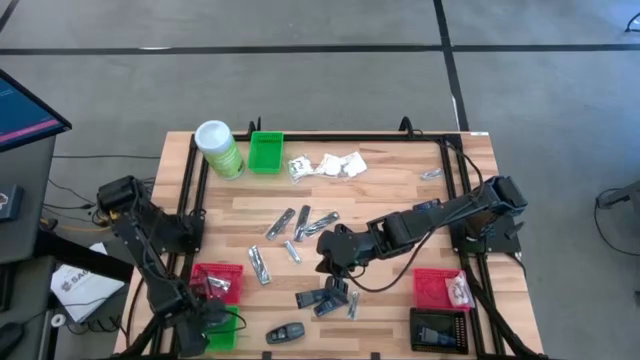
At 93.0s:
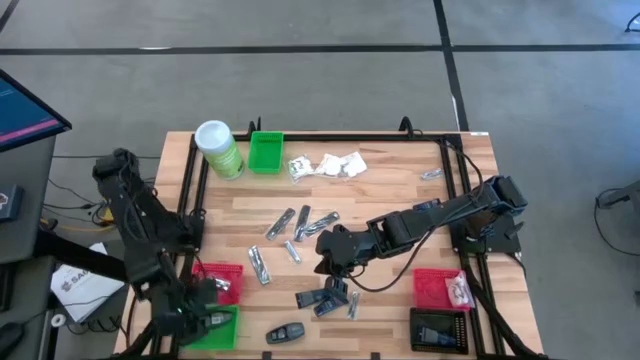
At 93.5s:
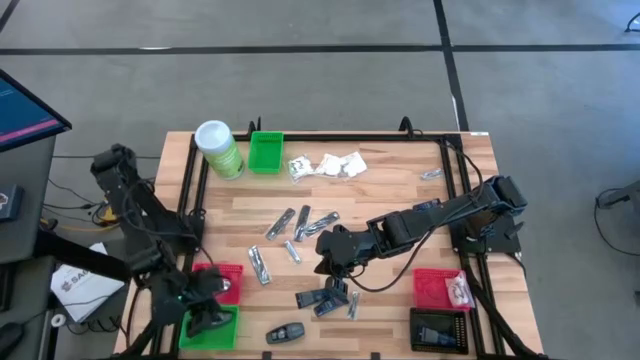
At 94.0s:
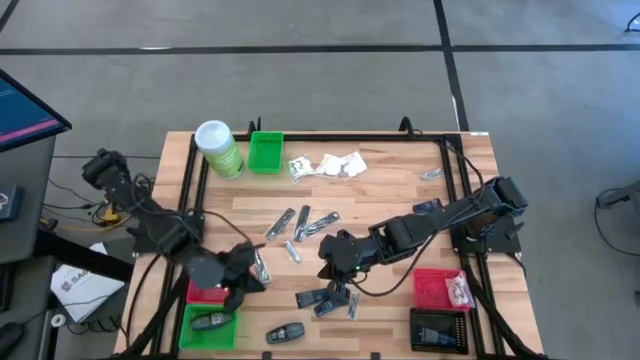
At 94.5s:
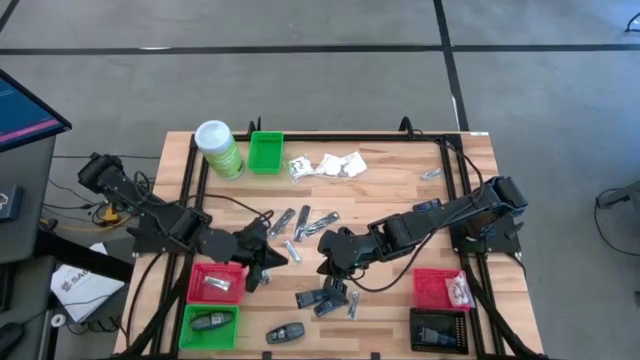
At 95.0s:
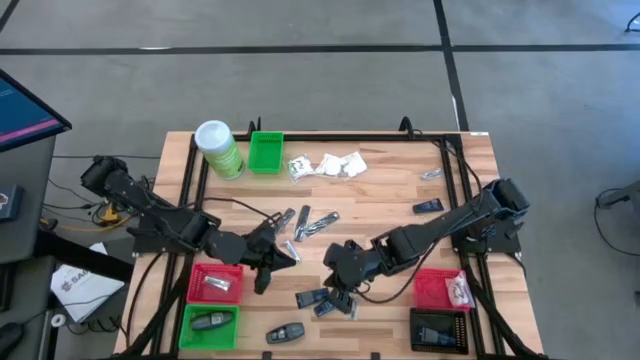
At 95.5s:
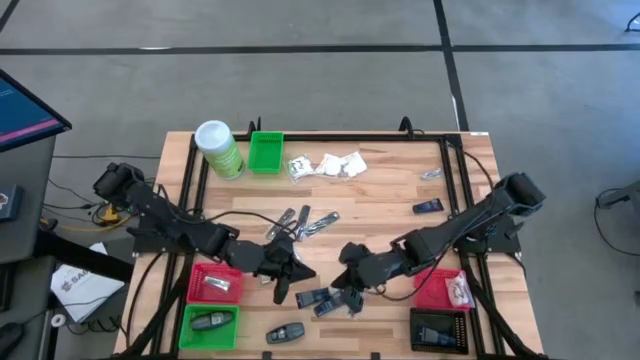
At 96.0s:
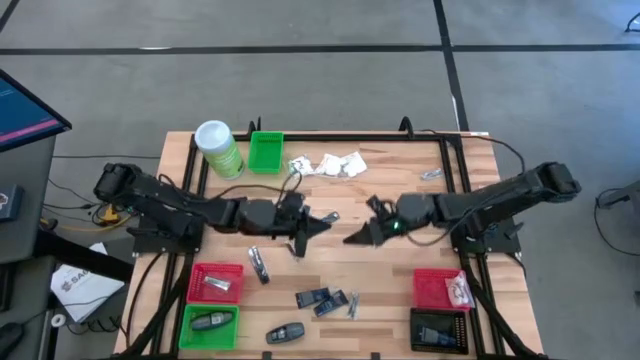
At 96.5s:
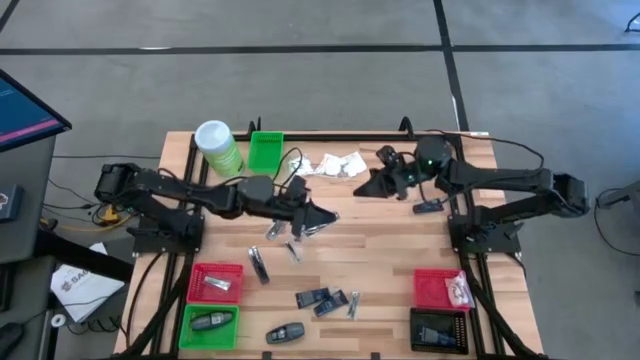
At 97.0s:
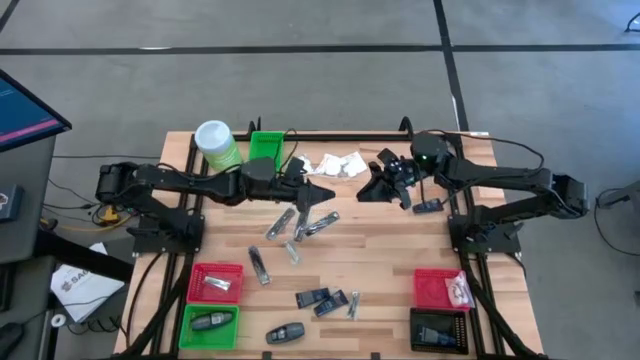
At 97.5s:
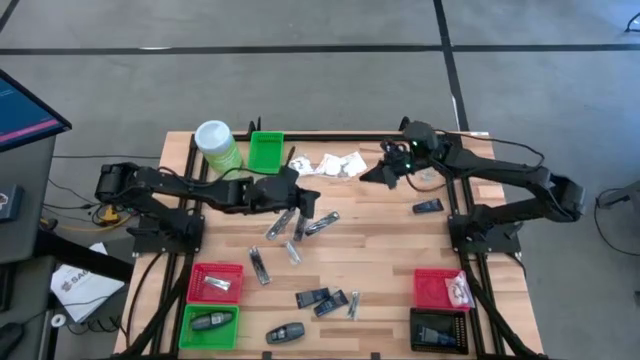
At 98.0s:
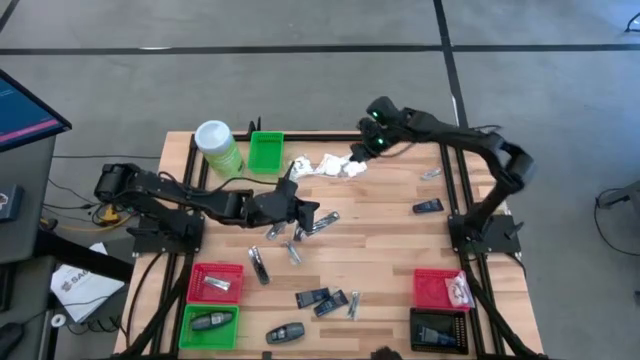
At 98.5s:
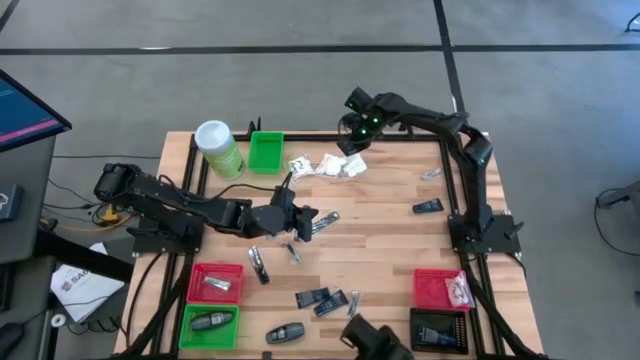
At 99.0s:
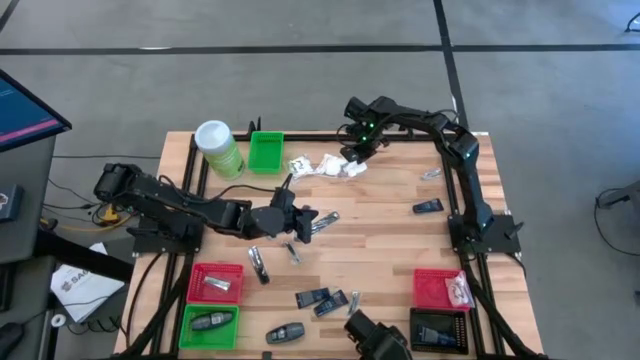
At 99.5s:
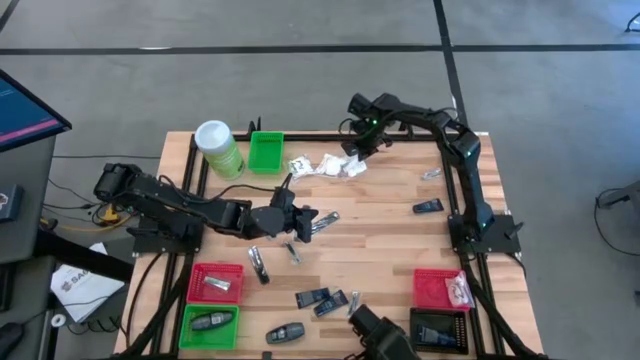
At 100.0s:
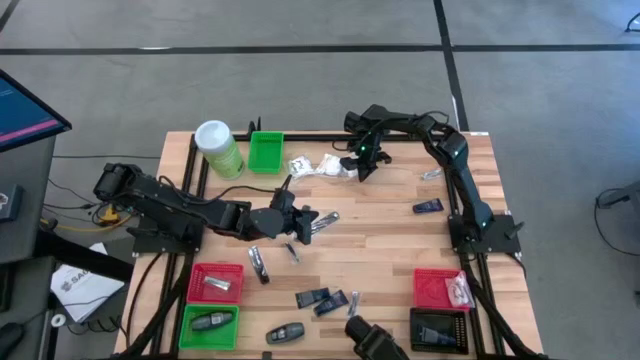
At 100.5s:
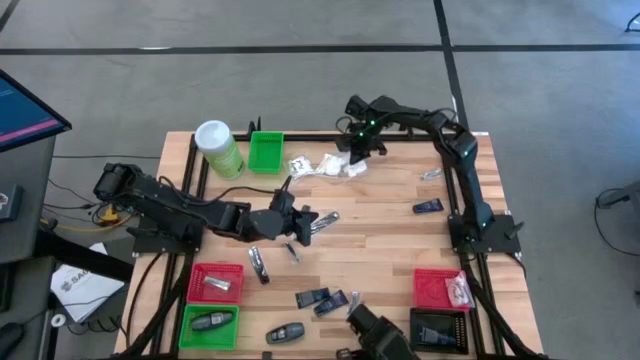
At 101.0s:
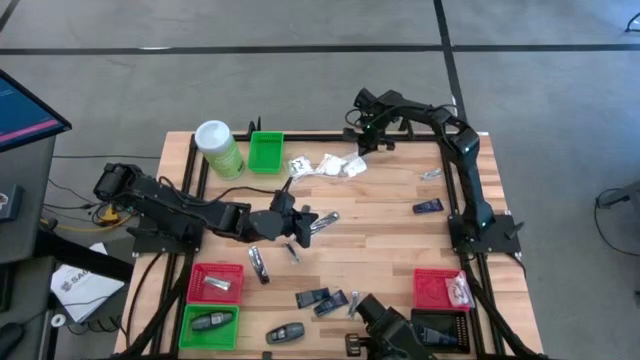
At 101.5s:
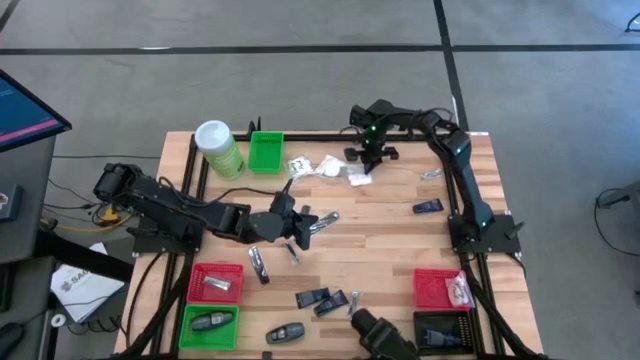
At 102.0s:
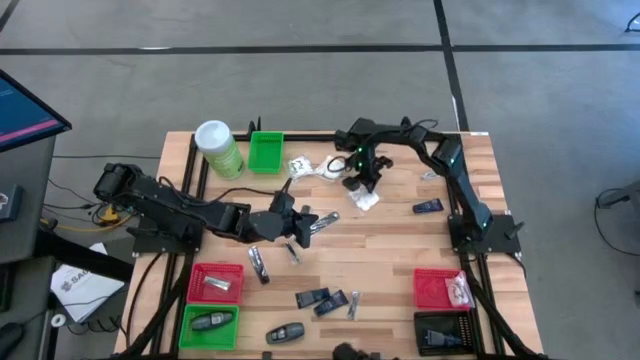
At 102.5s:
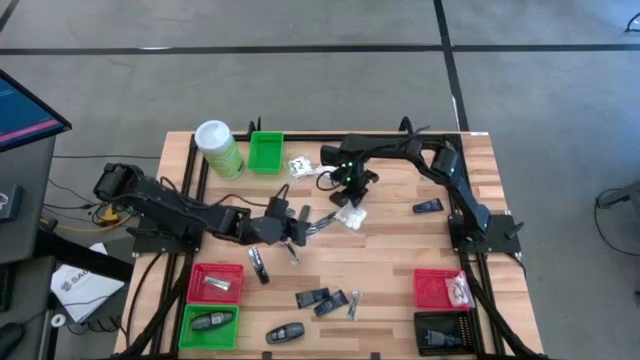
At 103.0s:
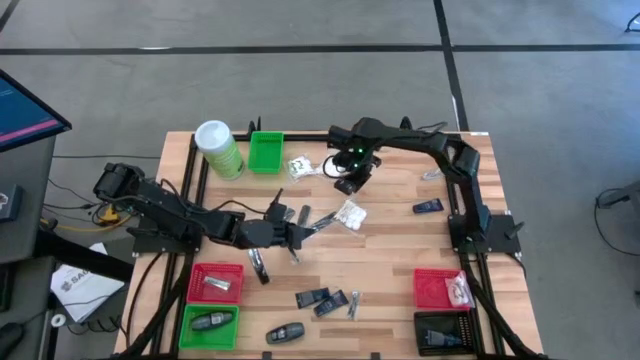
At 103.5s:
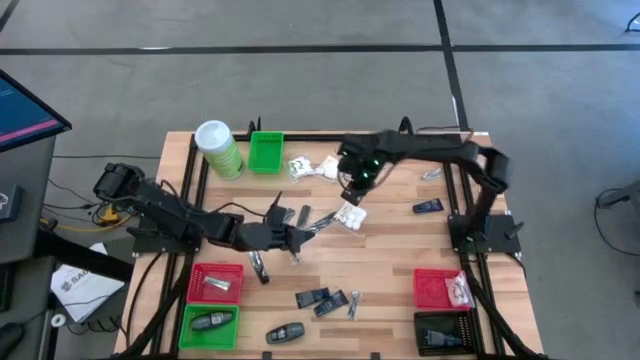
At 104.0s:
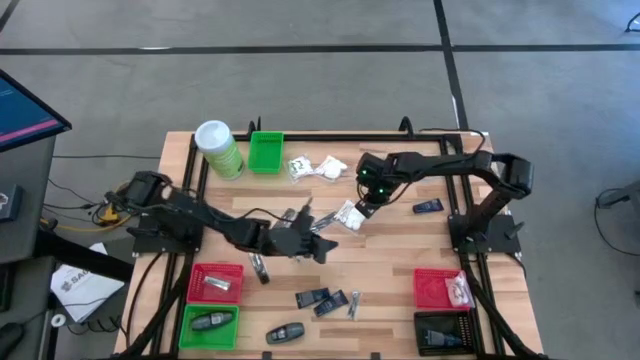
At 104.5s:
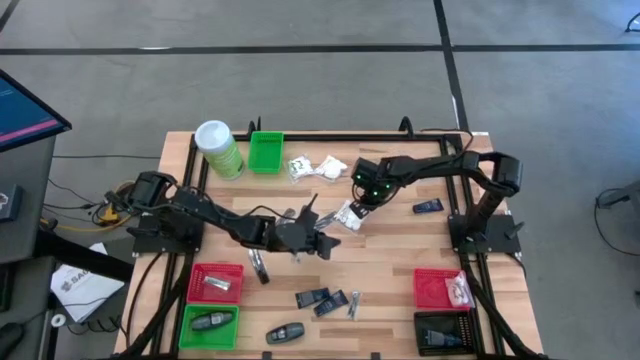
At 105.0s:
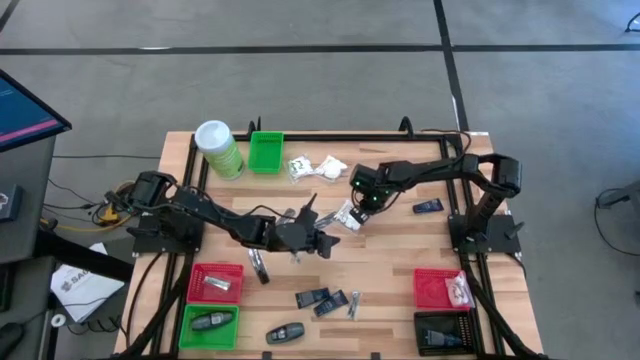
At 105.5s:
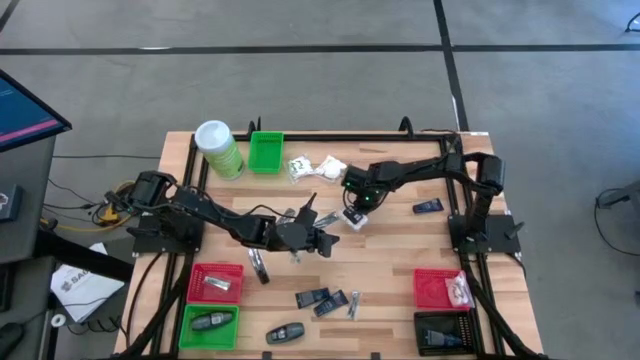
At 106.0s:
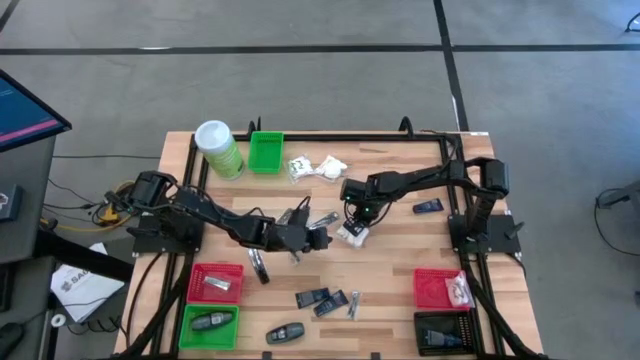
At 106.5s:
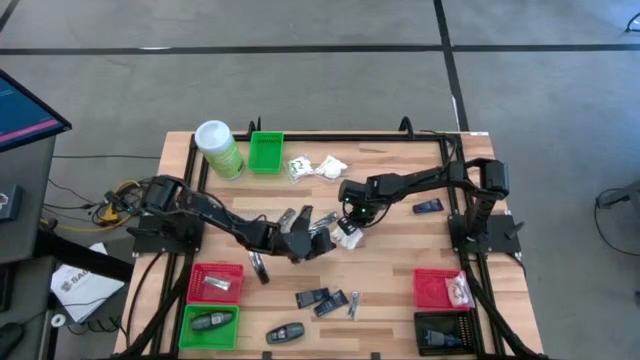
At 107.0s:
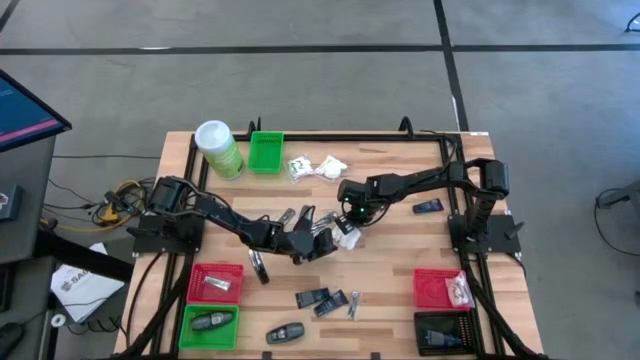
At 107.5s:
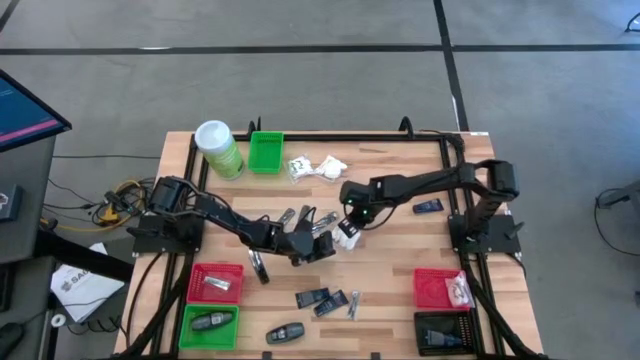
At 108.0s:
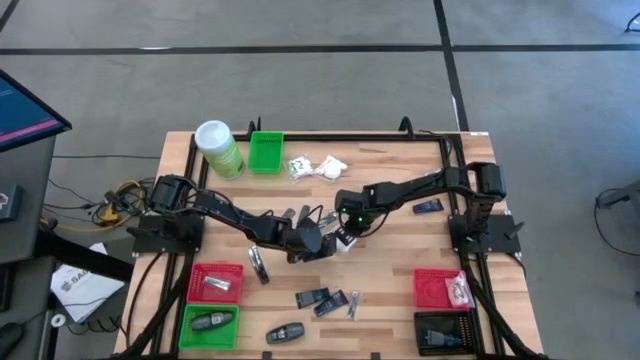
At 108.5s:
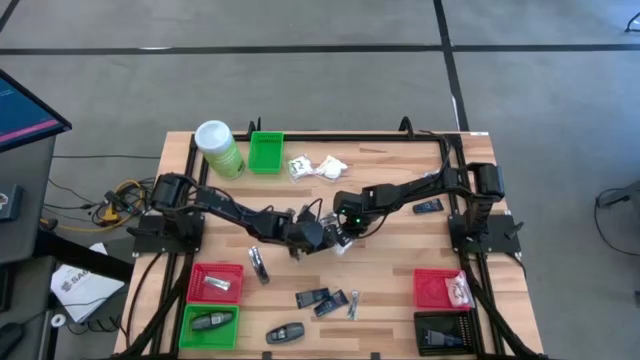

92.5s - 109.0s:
Task: Pick & Place Travel size toiletries
Put the cotton pack into the right red bin

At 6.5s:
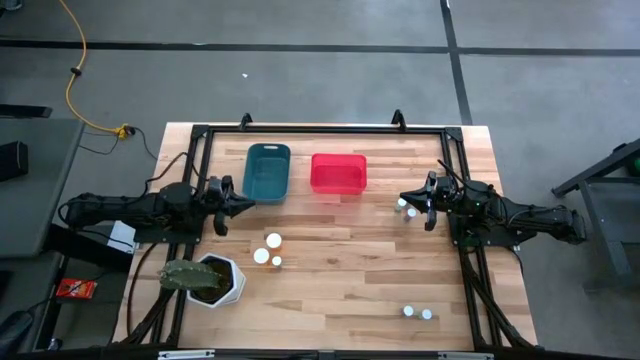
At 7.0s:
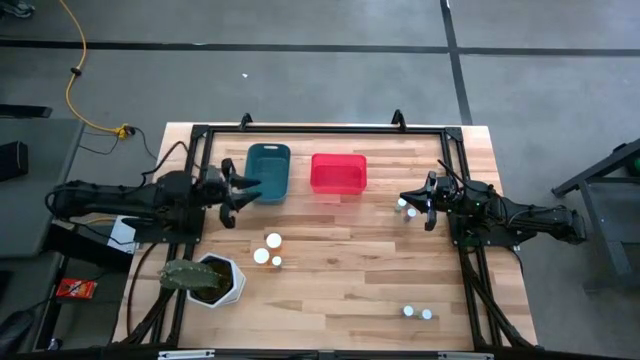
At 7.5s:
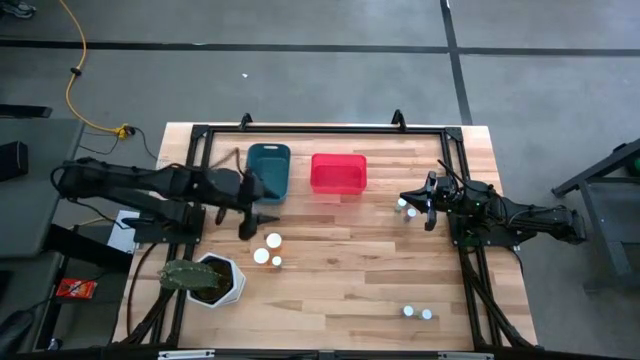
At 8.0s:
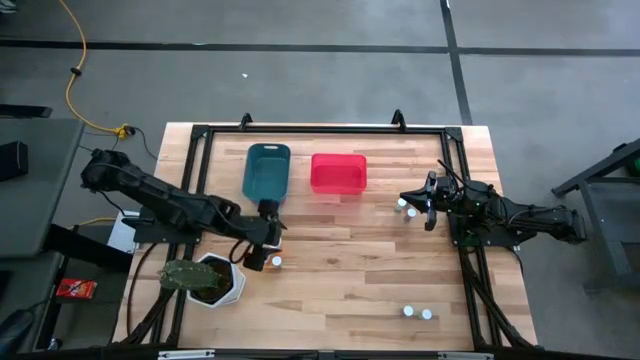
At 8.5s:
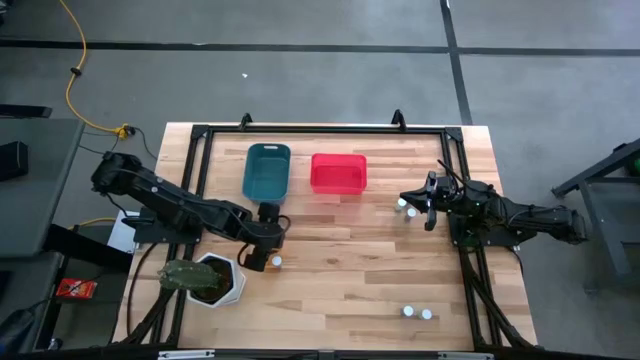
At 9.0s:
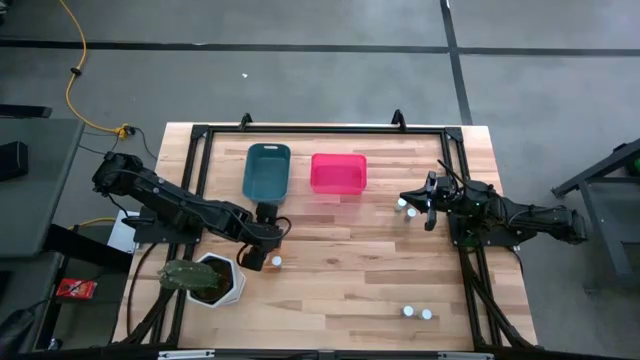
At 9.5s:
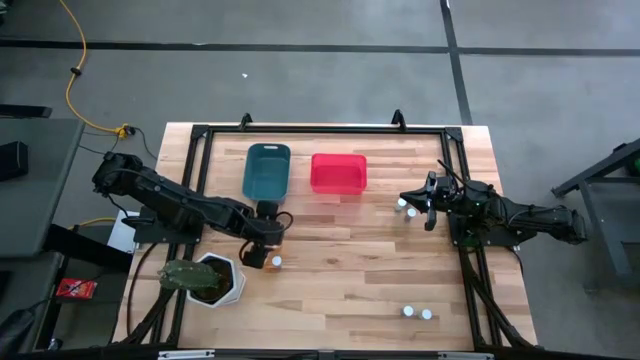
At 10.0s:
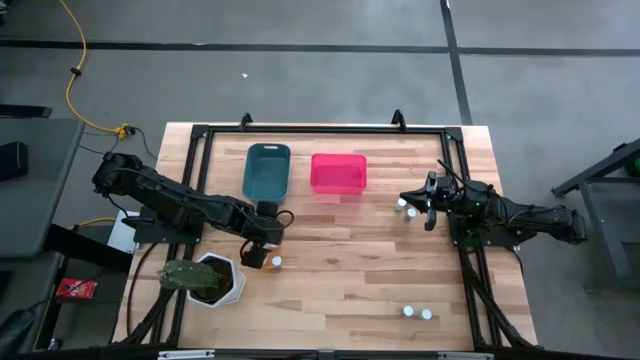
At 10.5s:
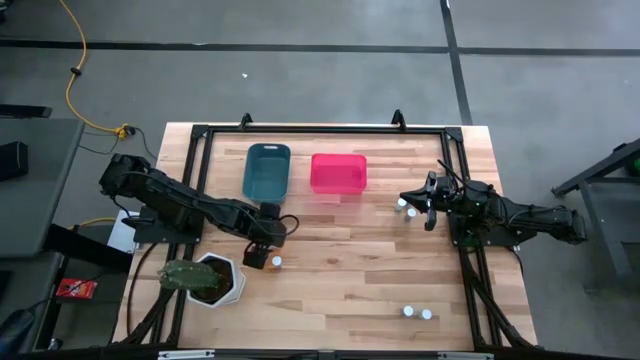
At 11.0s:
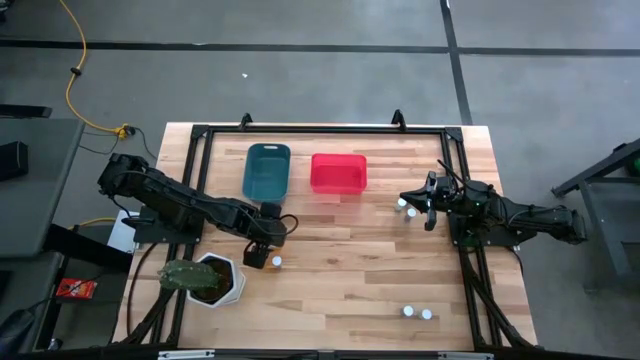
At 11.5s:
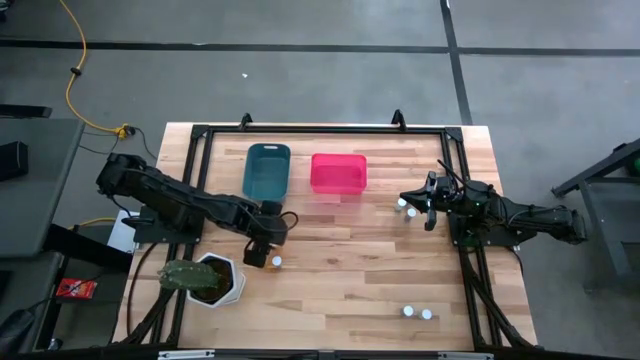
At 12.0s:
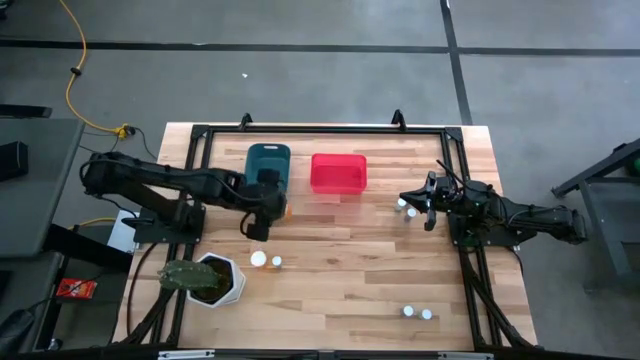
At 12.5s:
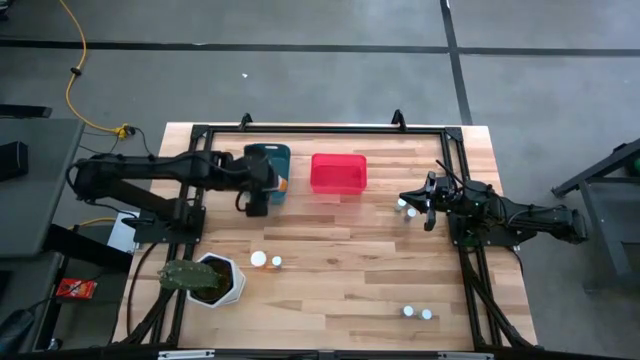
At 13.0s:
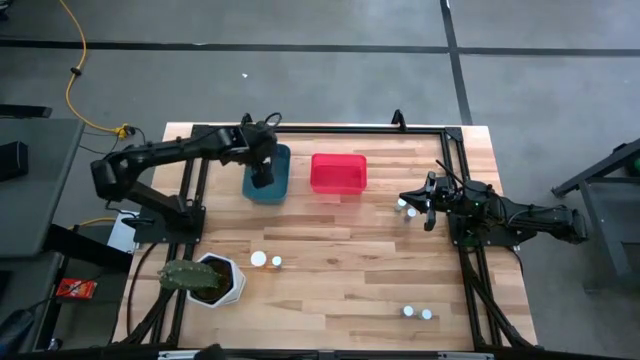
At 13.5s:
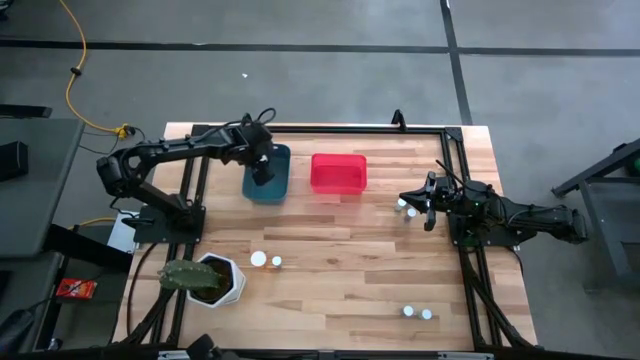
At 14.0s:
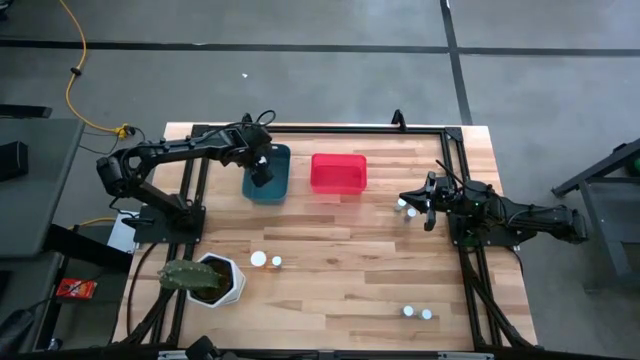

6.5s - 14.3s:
Task: Pick and place medicine bottles into bin by pill shape (circle, oval)
Put the top orange capsule bottle into the blue bin
